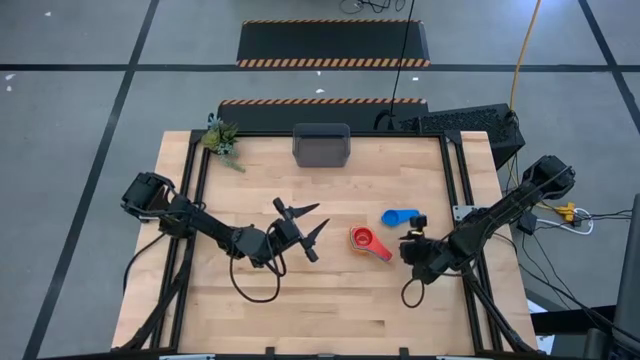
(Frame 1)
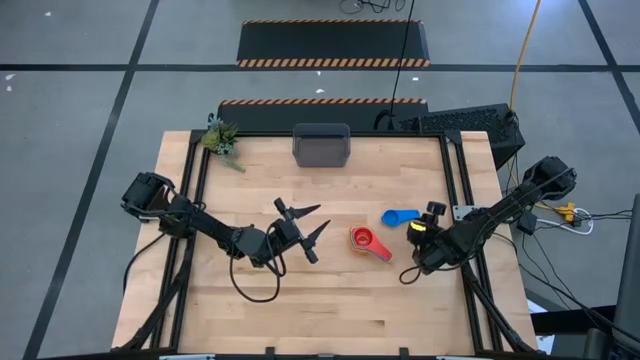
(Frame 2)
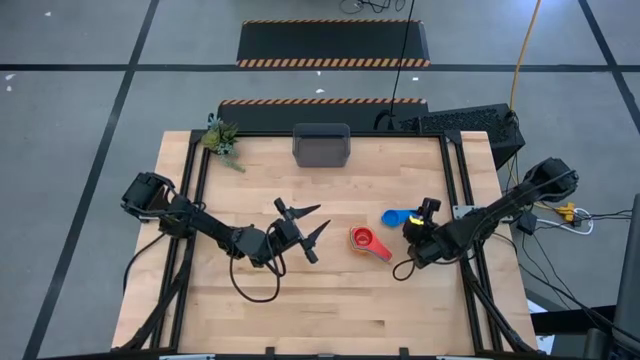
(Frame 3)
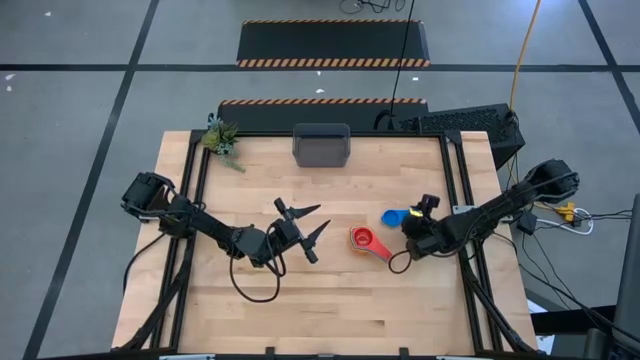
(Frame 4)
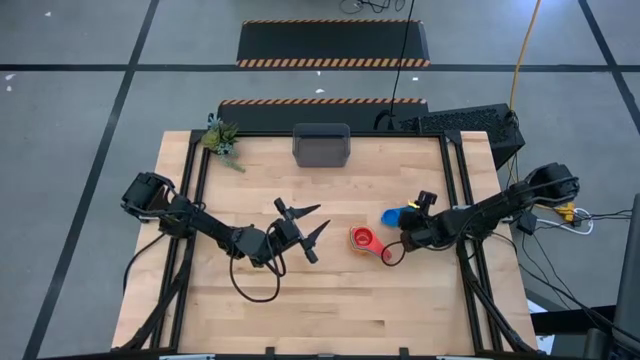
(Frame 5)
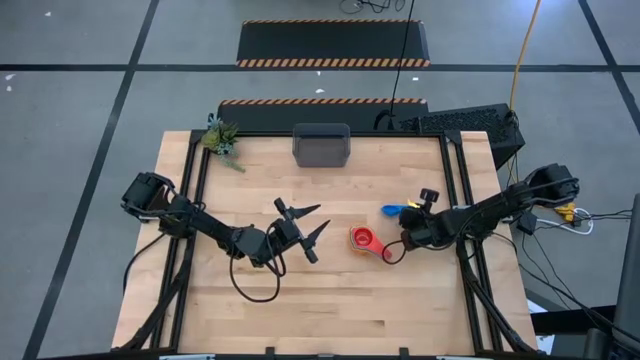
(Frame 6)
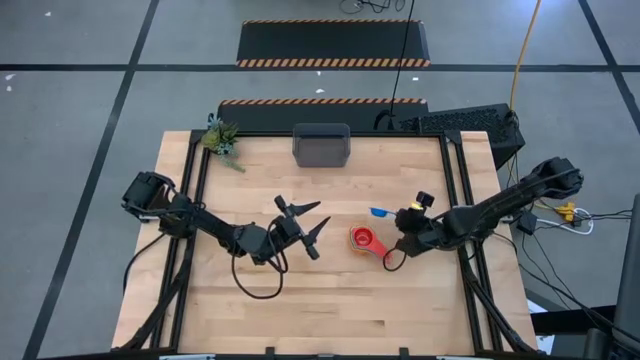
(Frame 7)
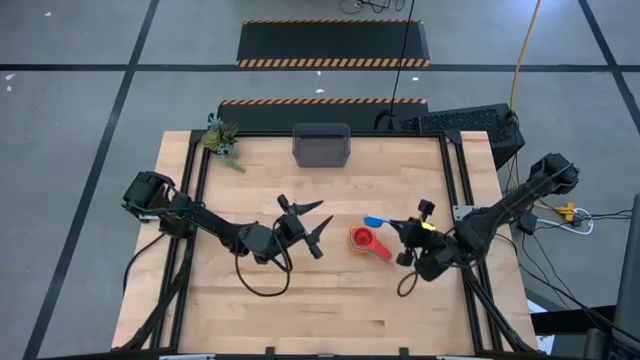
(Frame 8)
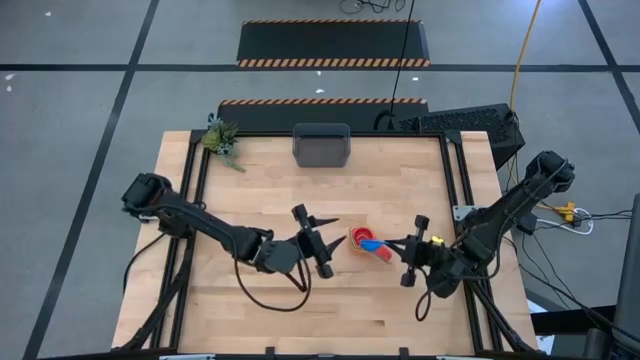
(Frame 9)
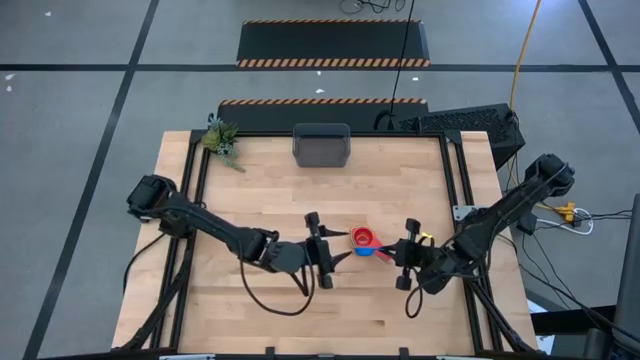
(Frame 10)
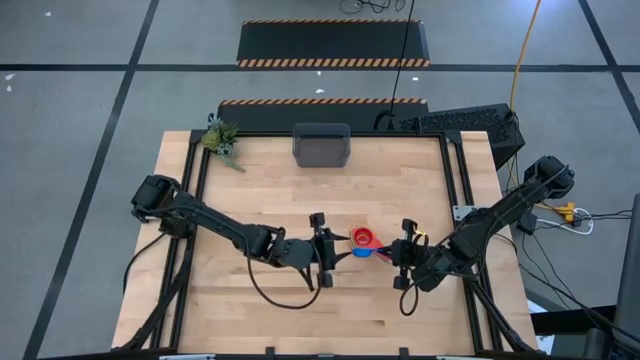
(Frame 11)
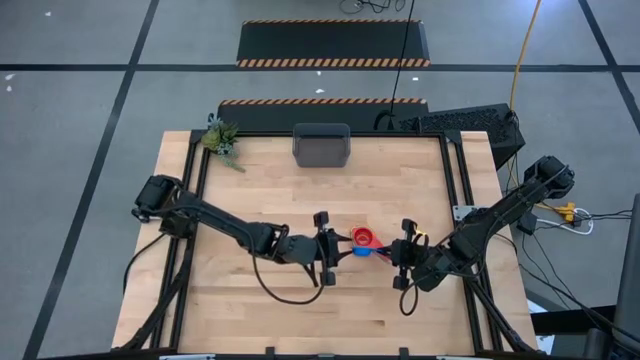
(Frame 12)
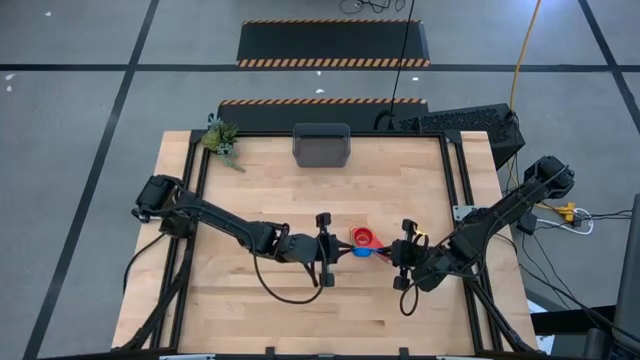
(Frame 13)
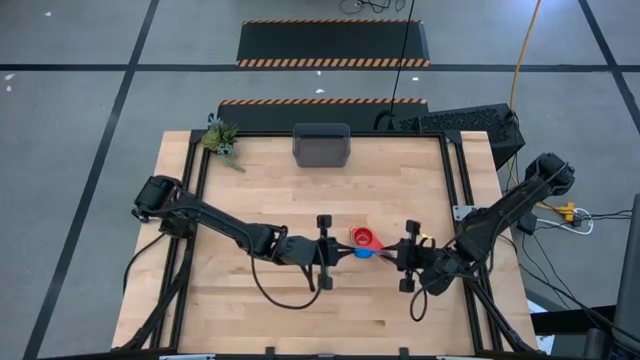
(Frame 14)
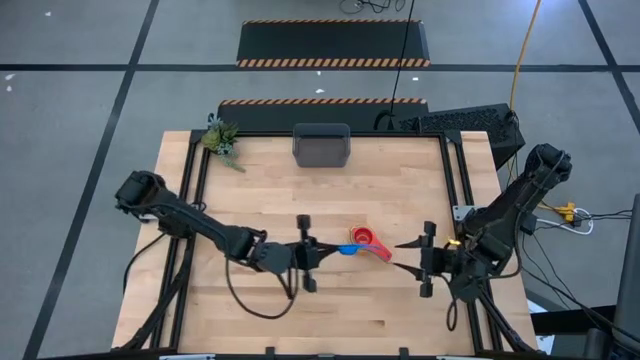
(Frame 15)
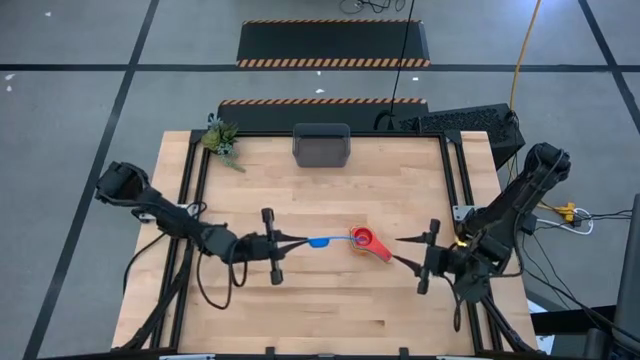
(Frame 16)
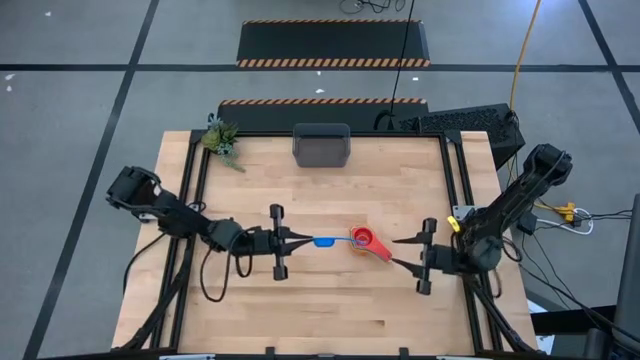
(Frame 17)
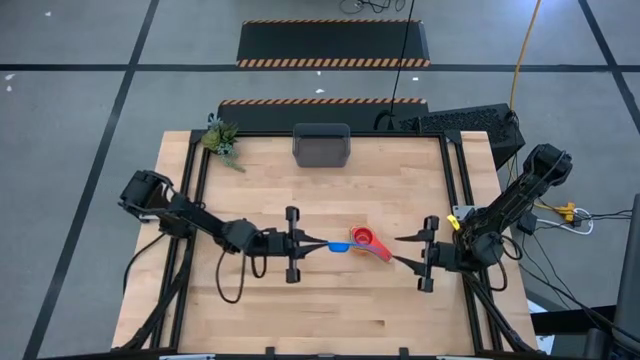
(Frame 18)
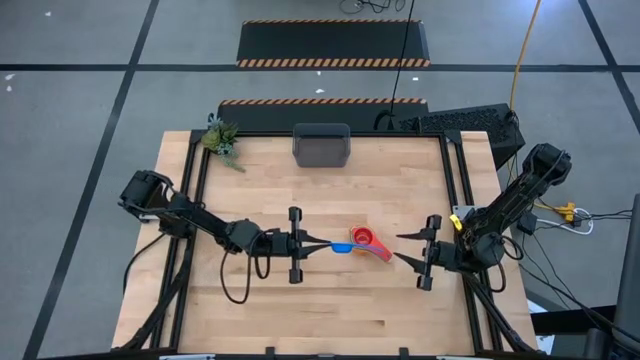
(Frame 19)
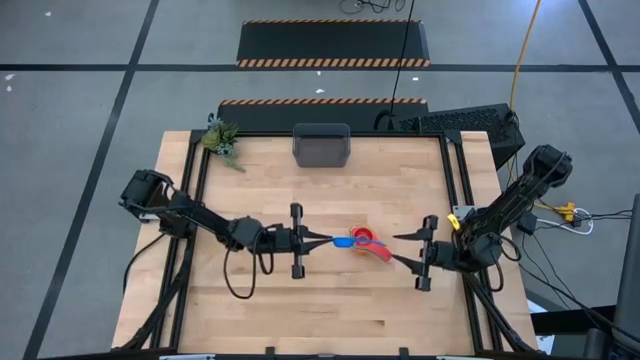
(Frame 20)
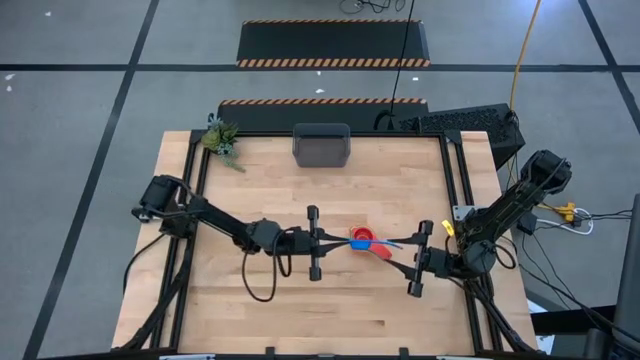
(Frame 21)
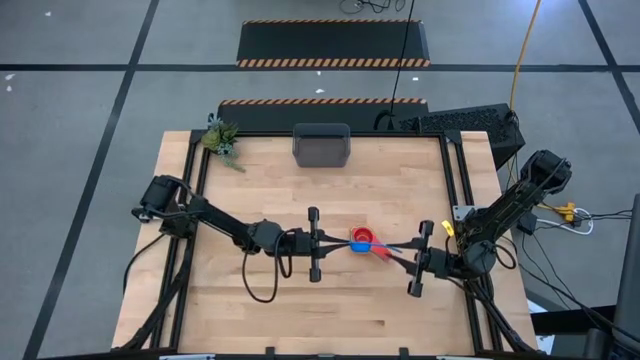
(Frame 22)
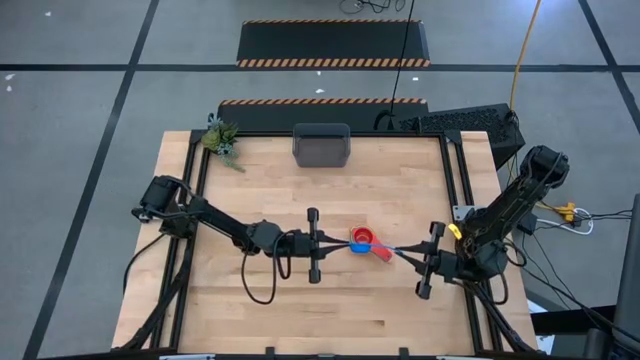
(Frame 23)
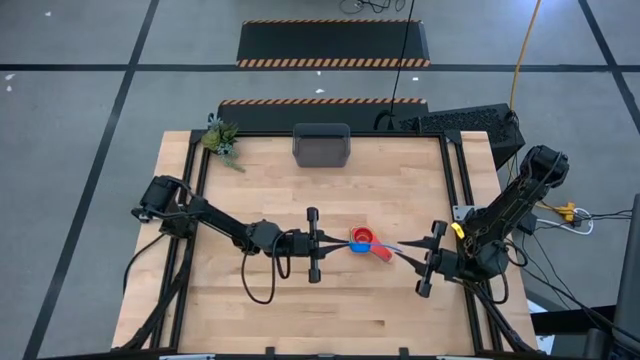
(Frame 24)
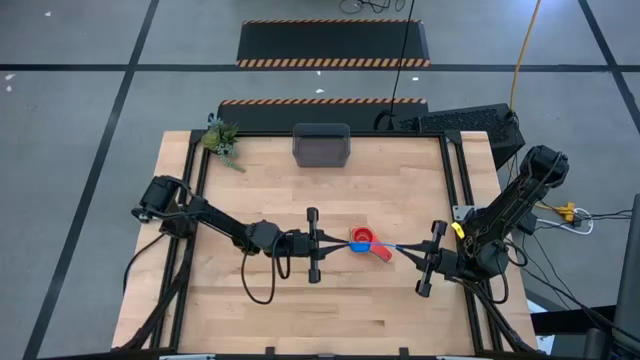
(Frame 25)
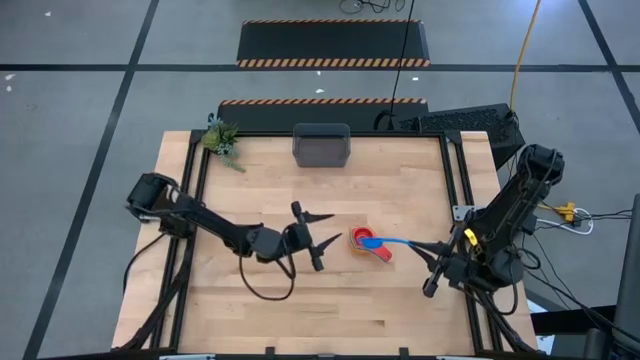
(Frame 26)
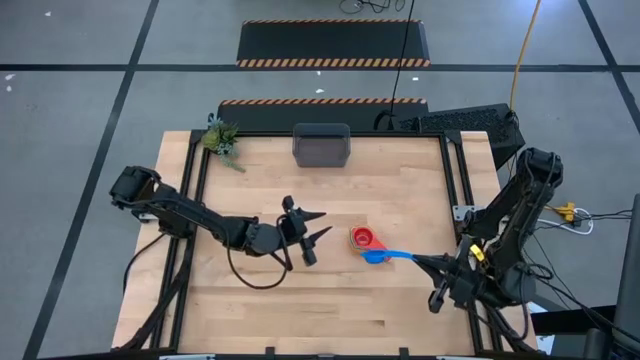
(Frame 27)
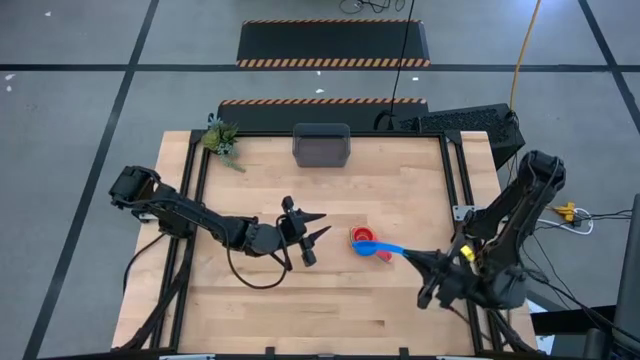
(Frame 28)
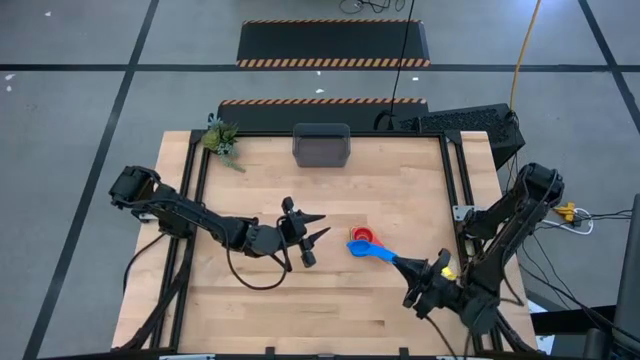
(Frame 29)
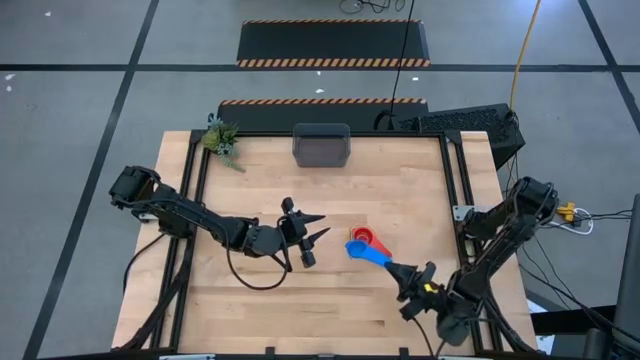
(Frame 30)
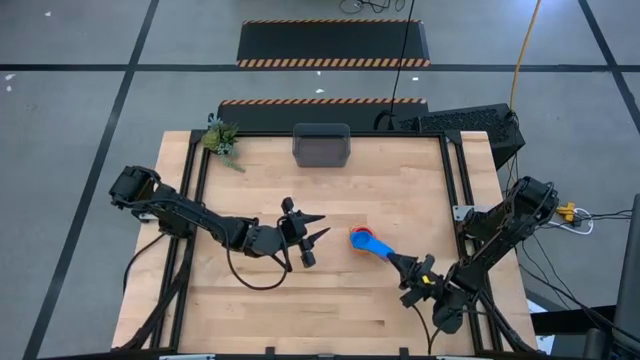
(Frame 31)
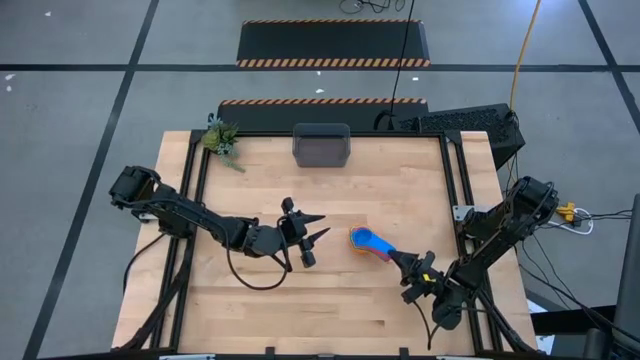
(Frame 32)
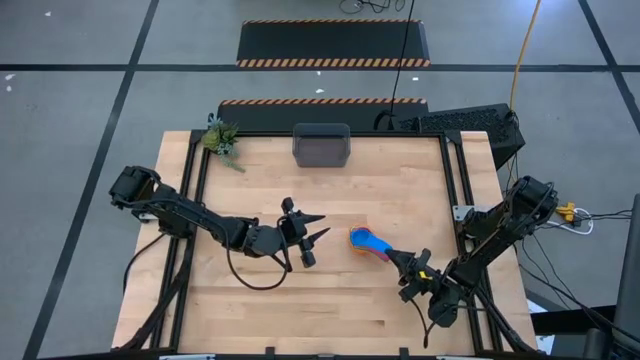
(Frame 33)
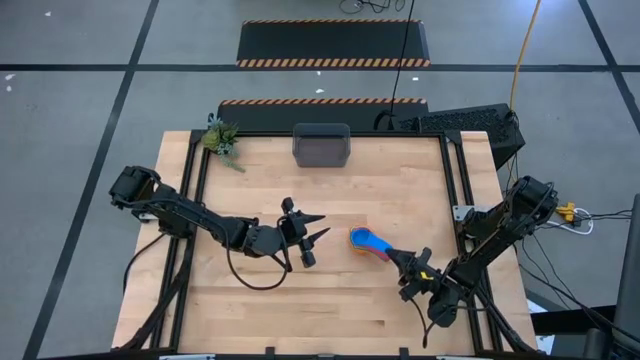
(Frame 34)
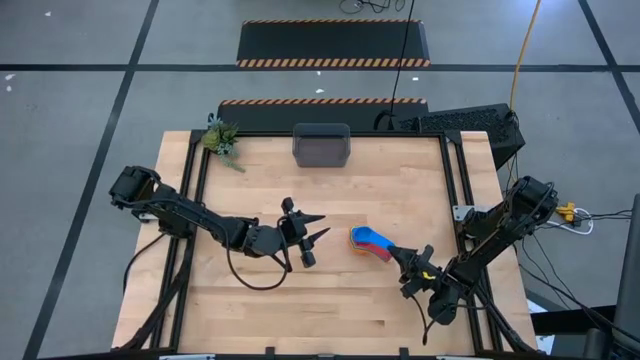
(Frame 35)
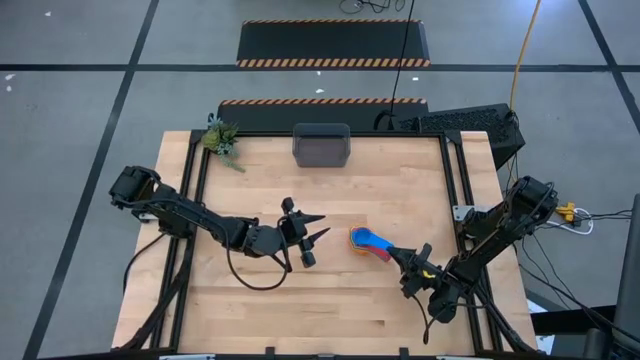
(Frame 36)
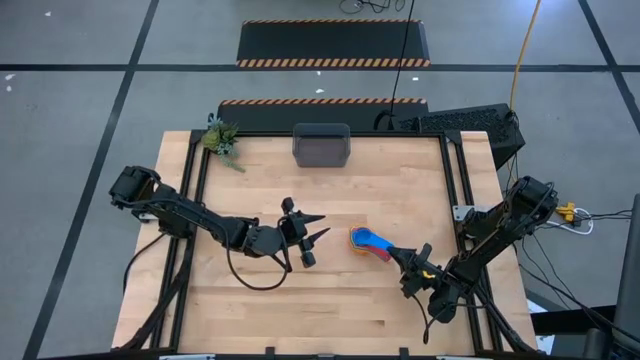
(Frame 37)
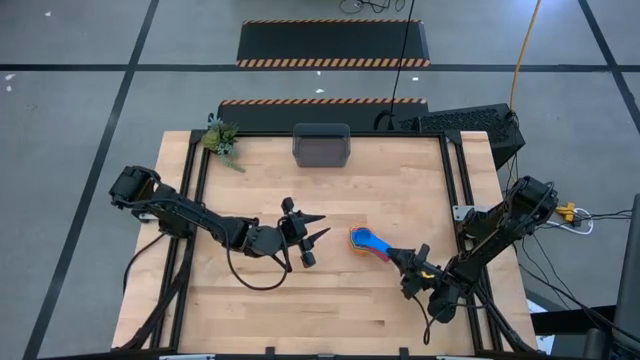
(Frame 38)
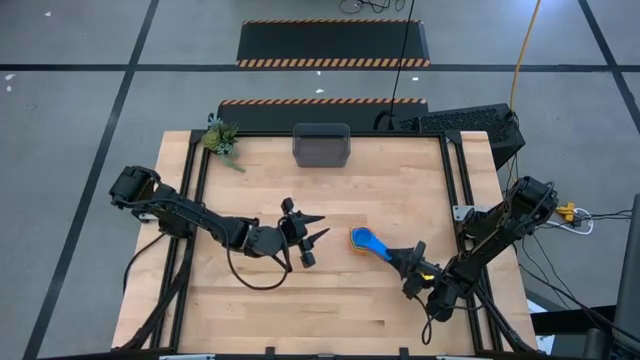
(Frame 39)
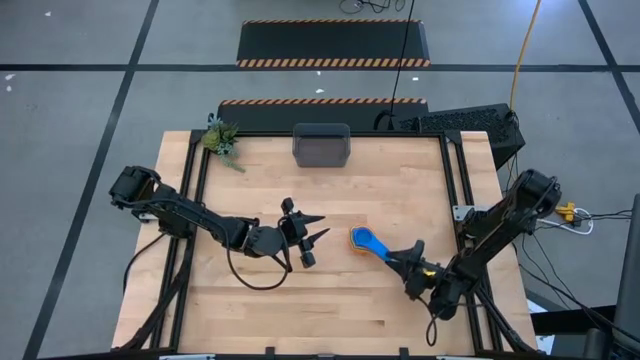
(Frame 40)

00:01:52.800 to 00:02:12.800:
Task: Nest measuring cups in basket
Stack the blue measuring cup on top of the red measuring cup

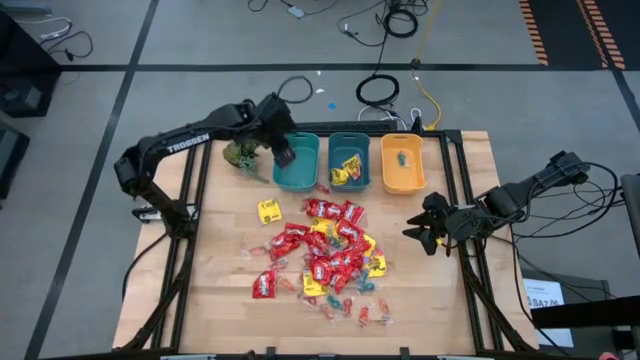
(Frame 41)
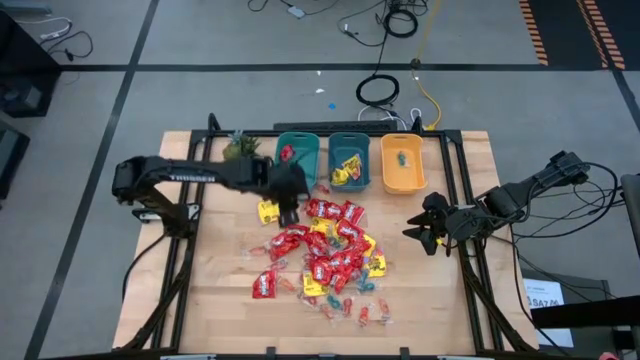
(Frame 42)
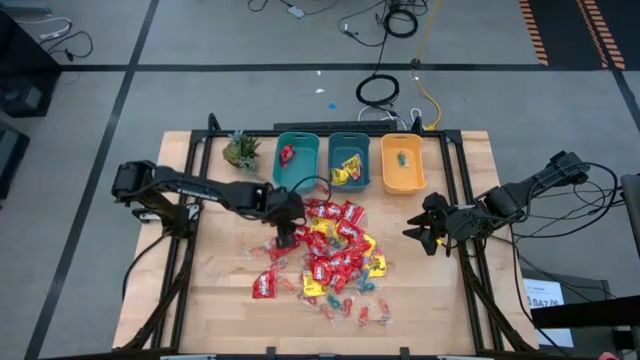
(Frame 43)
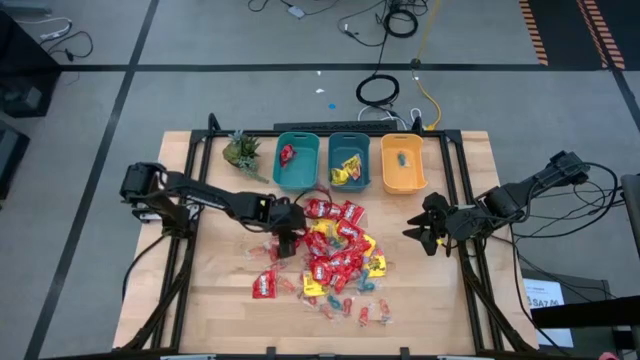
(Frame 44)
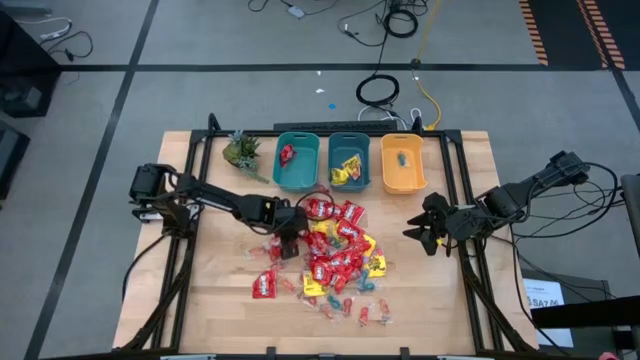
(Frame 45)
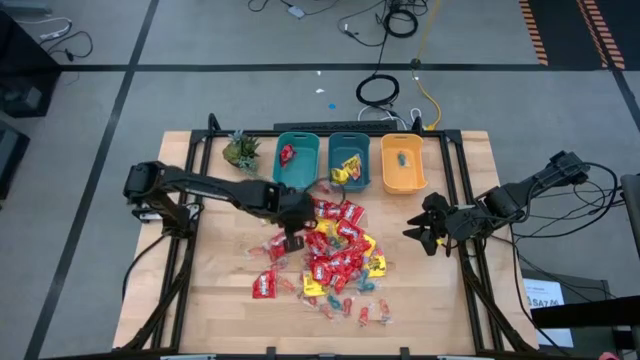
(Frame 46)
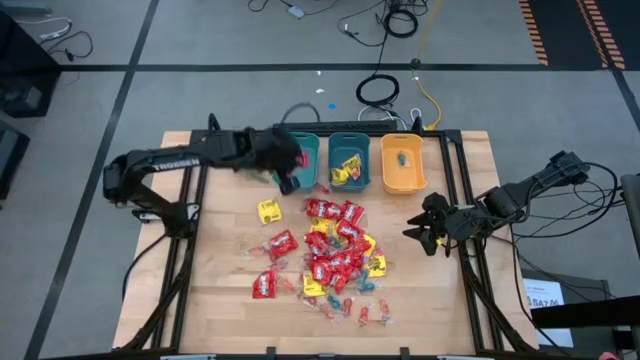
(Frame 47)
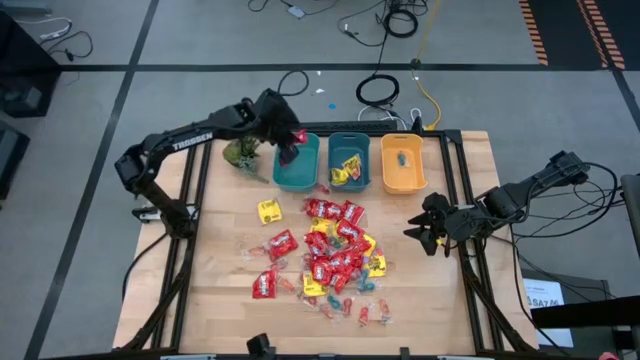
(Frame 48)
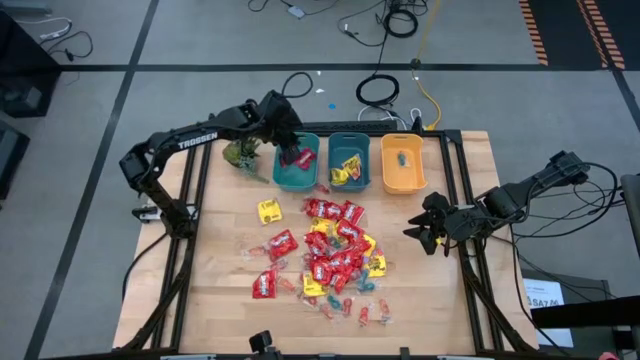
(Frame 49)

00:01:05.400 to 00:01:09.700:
Task: Sort candy
Put the red candy into the green bin
